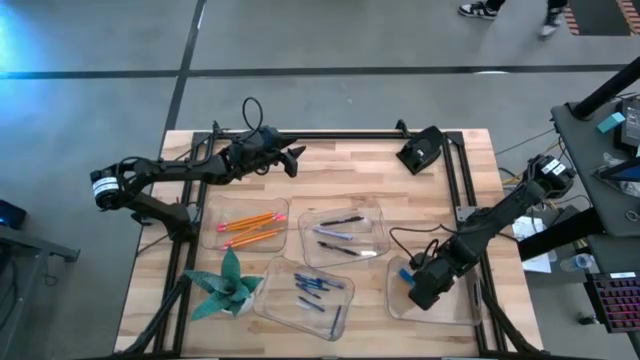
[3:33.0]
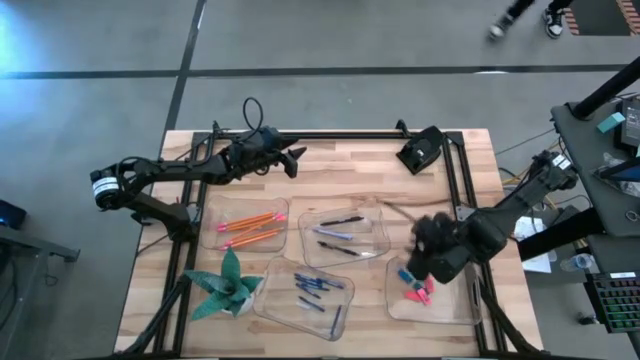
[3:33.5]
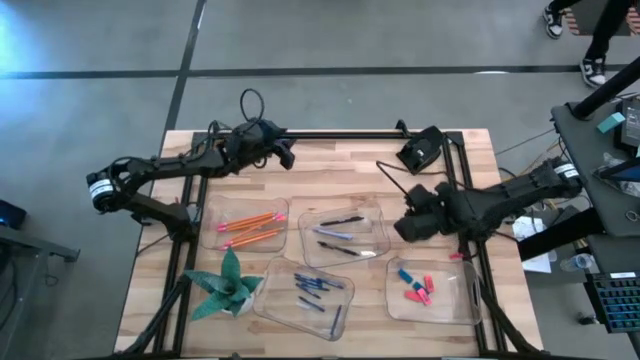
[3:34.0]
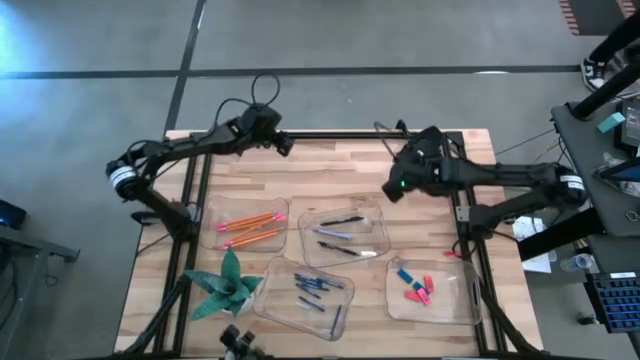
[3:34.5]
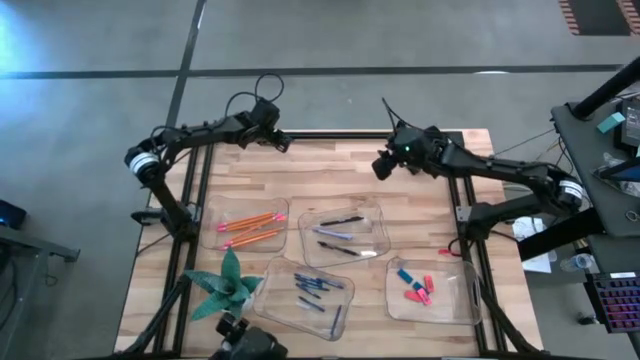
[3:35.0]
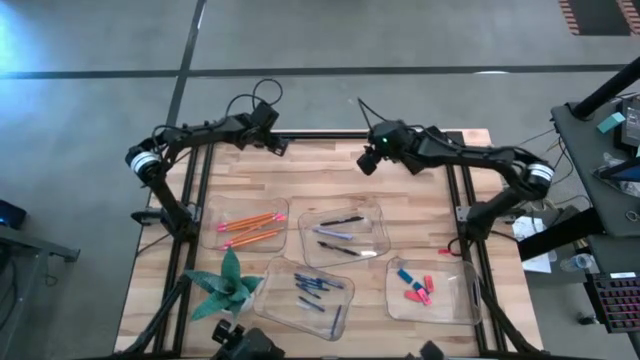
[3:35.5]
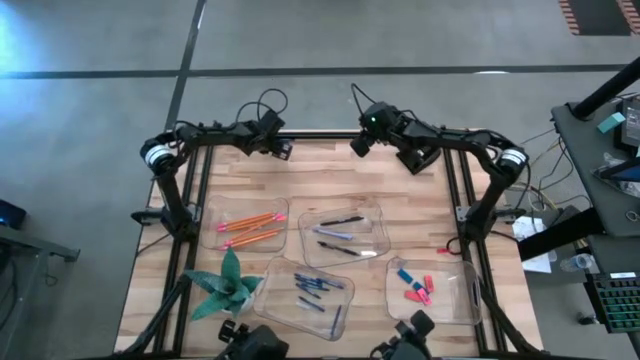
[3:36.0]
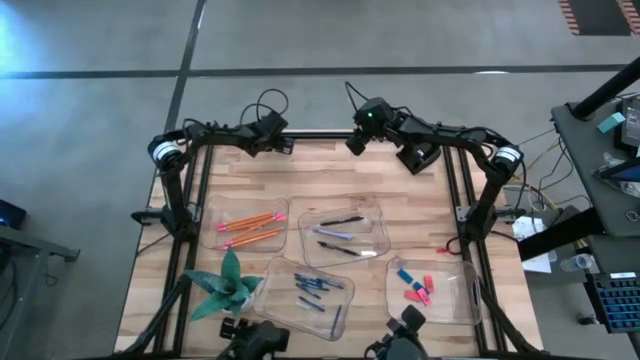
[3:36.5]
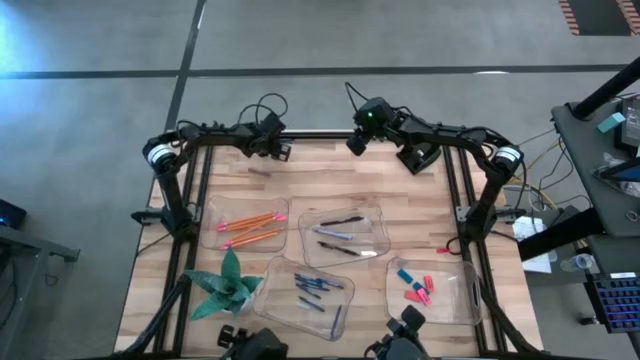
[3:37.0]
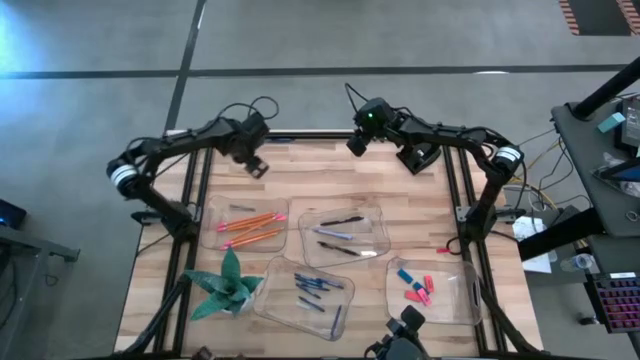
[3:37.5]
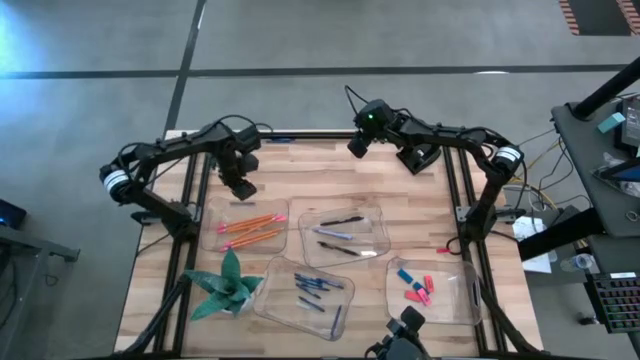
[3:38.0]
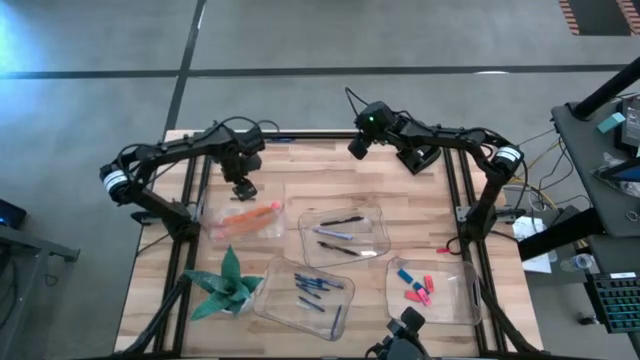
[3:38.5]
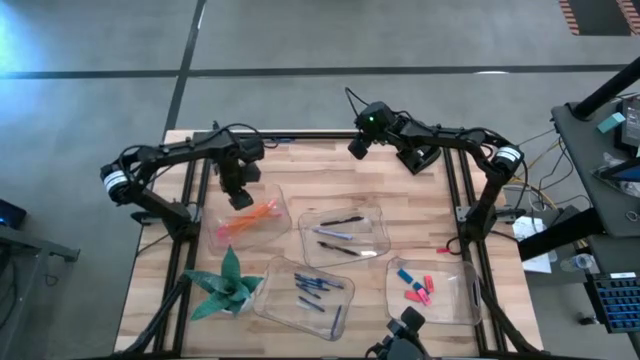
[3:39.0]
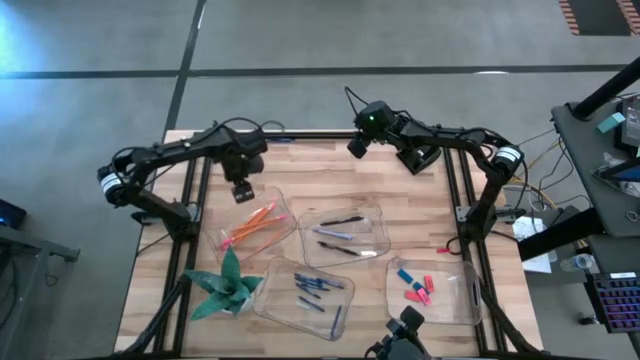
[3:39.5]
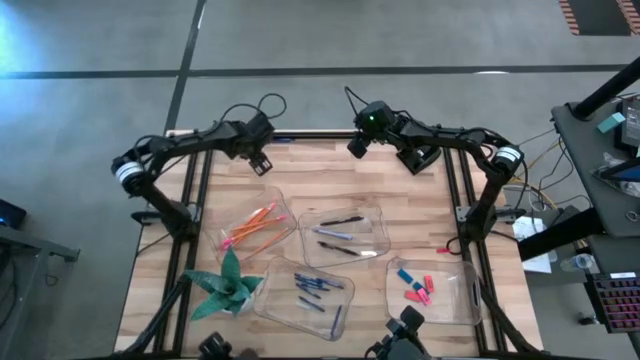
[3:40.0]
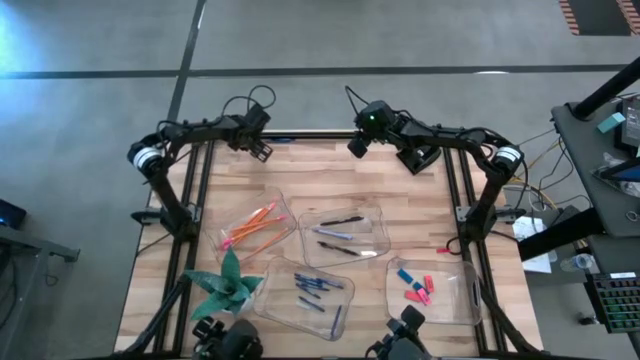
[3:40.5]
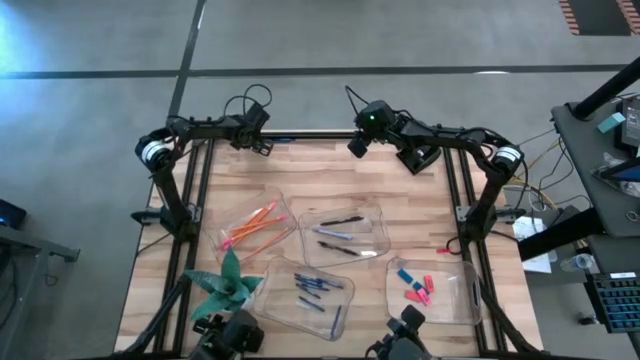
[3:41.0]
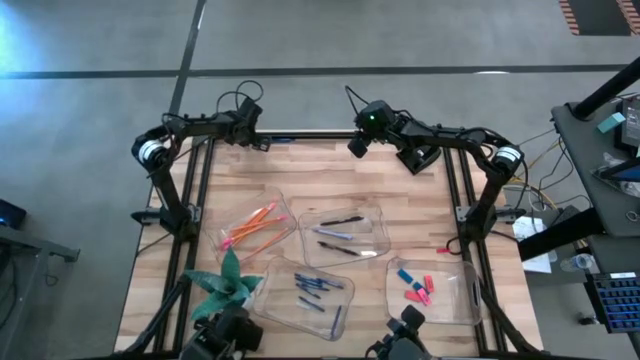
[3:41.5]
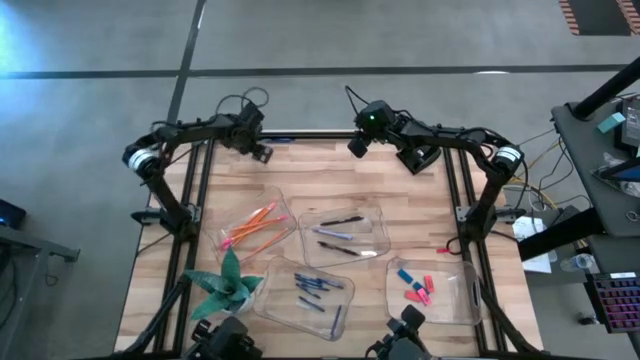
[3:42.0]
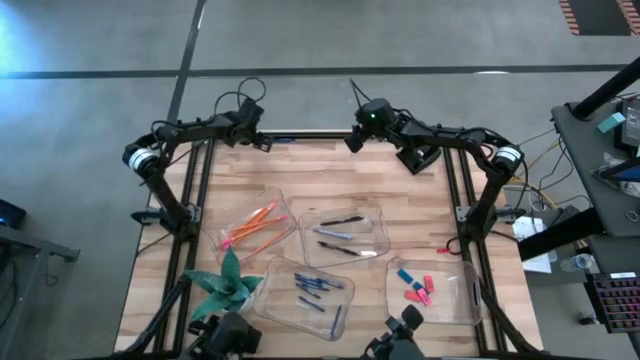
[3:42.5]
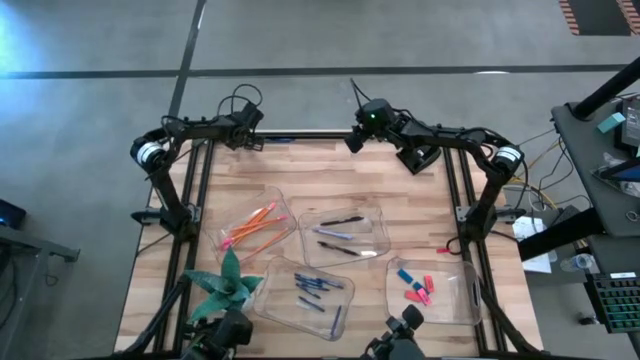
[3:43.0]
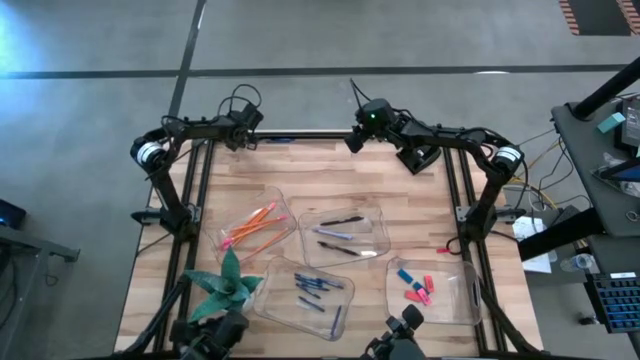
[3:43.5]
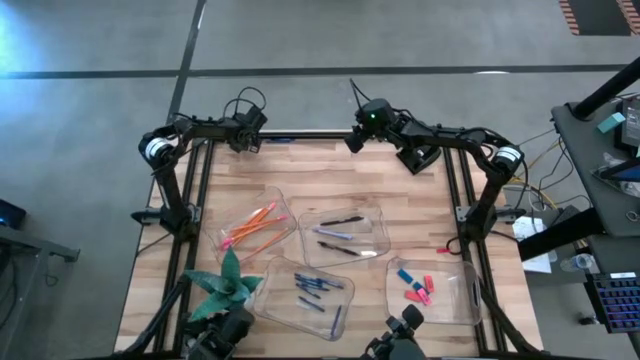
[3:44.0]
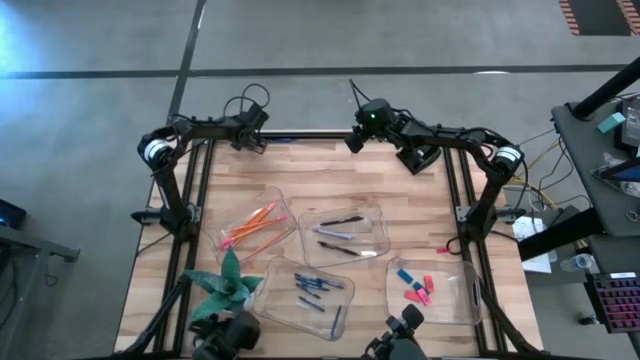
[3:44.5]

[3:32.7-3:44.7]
Task: Sort crayons/erasers/pens/pencils in bins
Put the blue crayon into the bottom left transparent bin

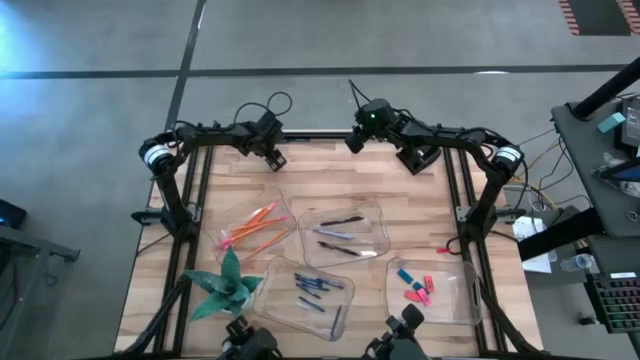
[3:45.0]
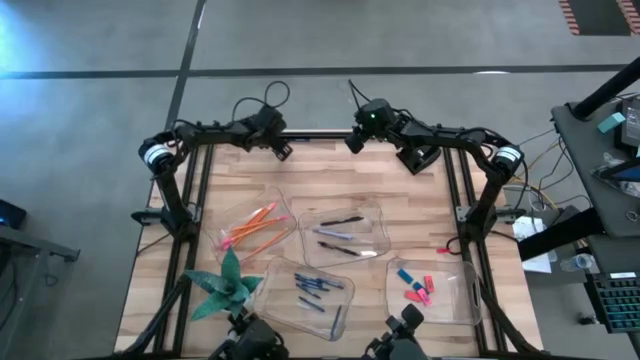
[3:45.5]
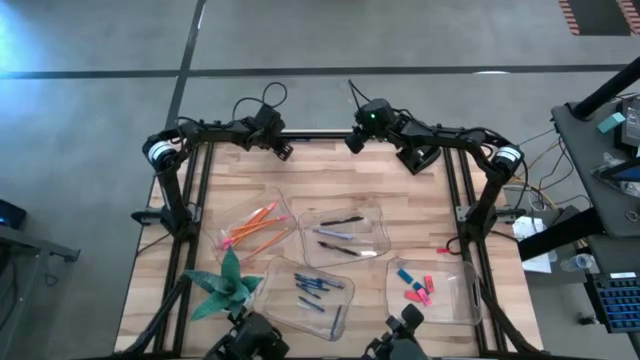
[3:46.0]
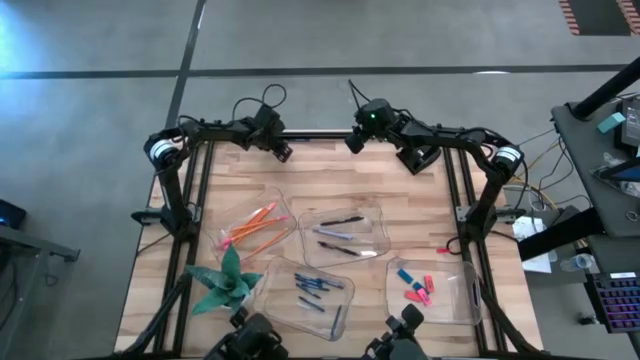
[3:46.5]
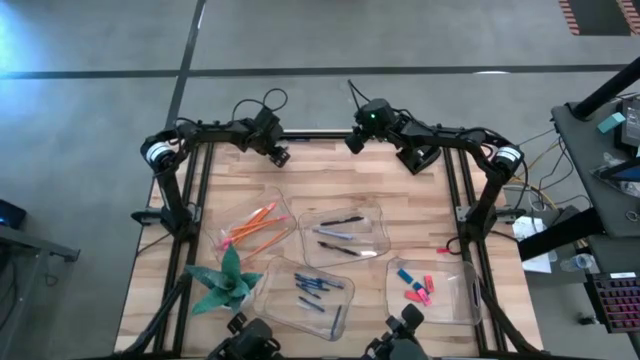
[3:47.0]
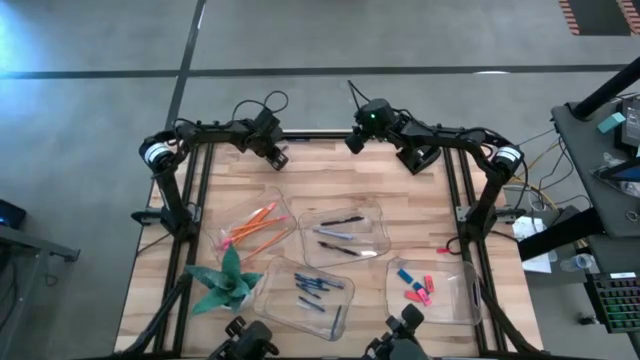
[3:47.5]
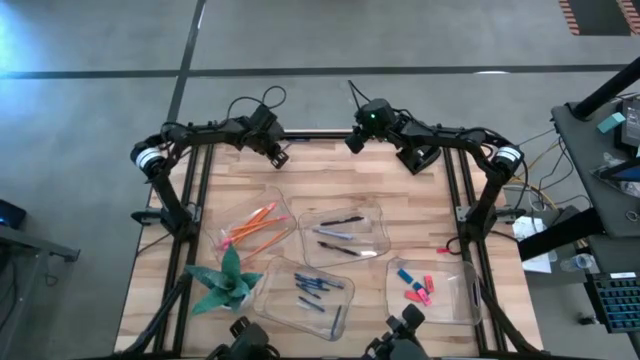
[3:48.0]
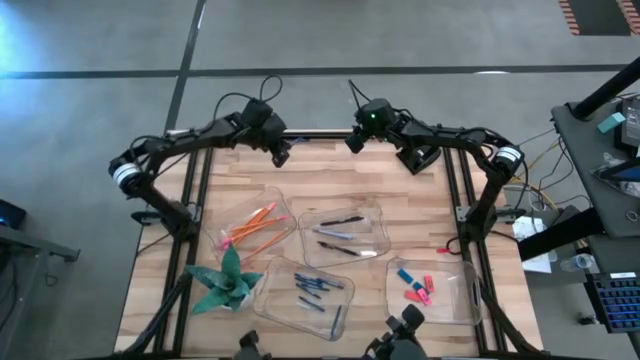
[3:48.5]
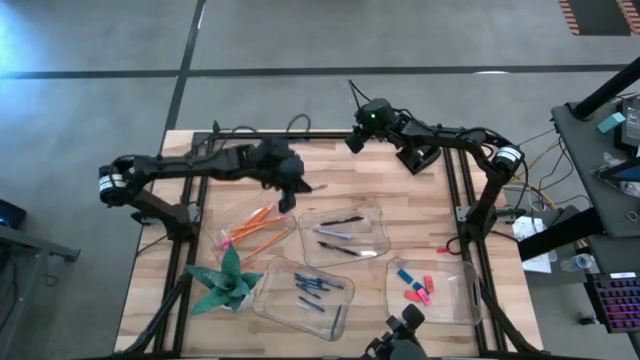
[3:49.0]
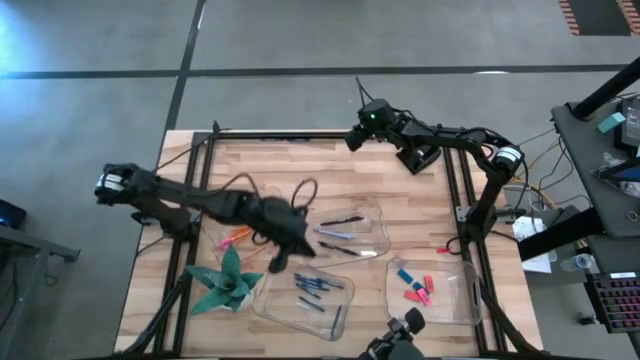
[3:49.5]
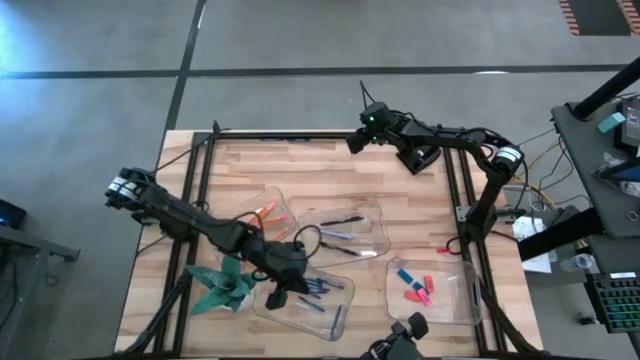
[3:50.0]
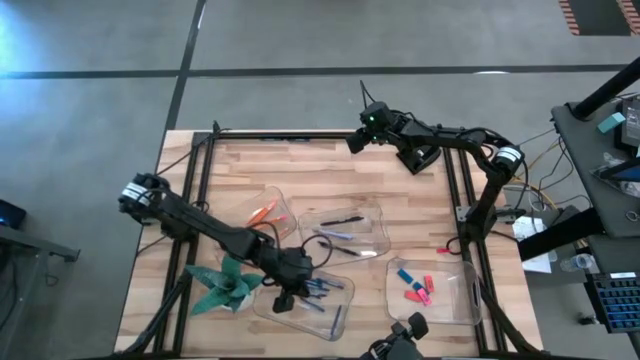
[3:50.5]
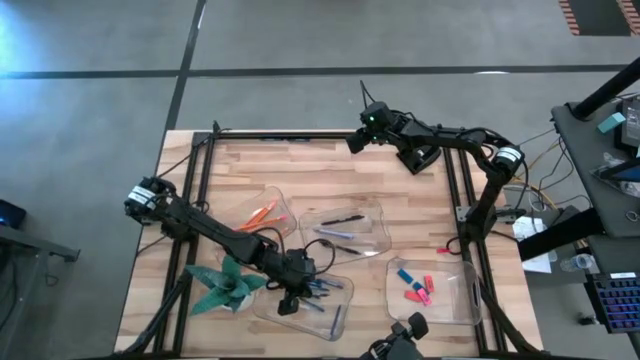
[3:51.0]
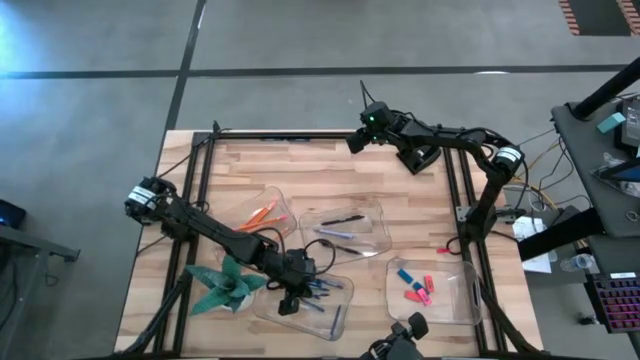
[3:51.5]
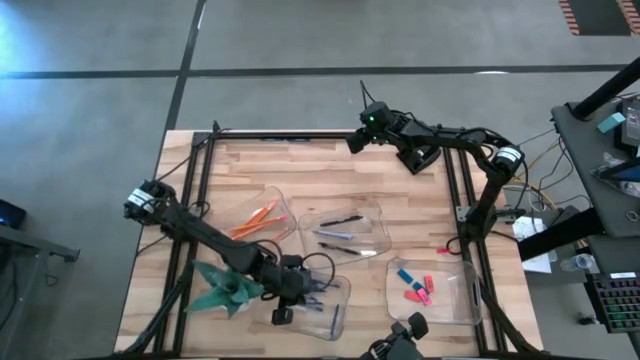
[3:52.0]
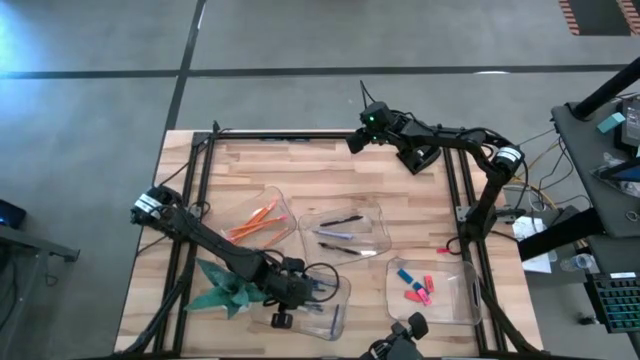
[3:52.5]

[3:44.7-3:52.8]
Put the blue crayon into the bottom left transparent bin
